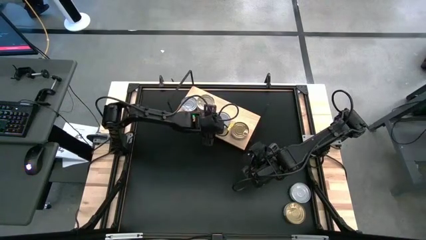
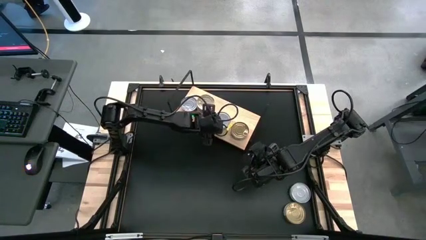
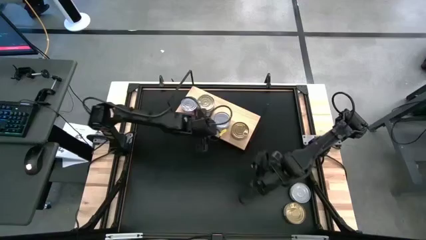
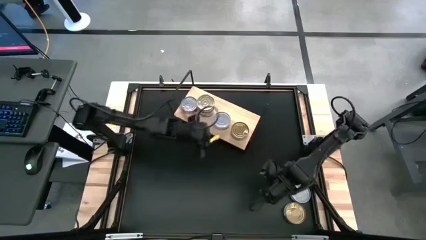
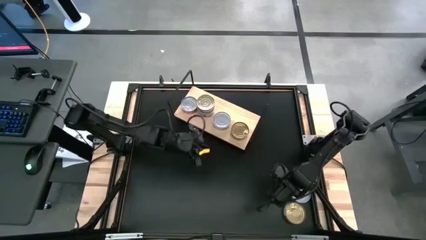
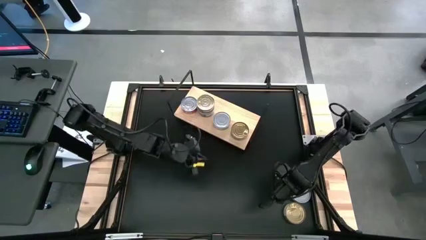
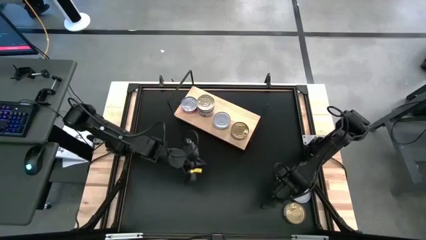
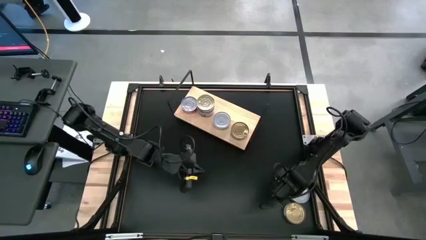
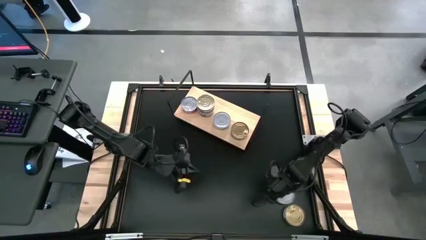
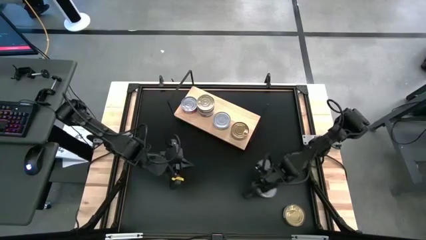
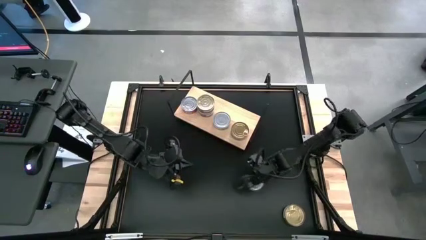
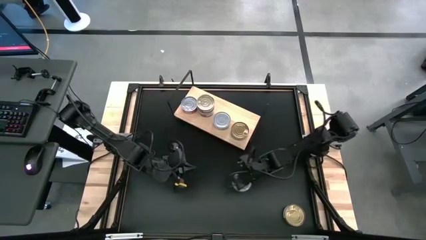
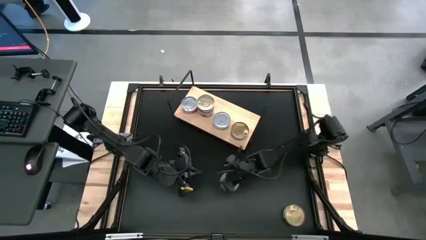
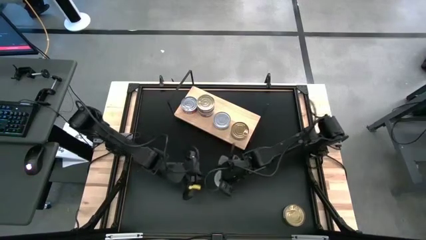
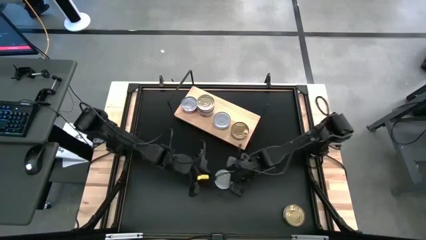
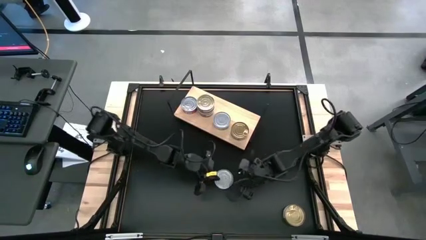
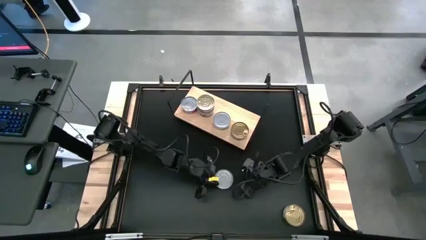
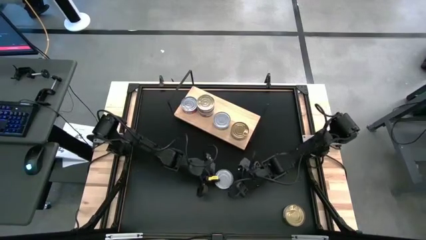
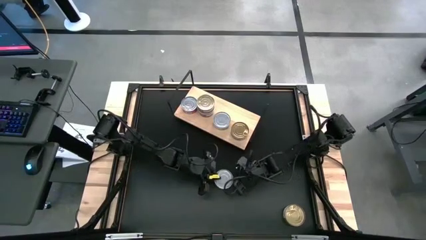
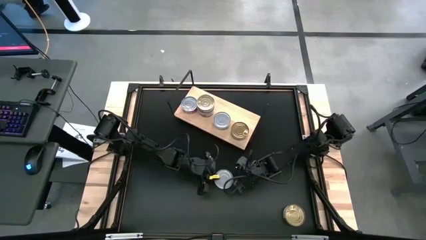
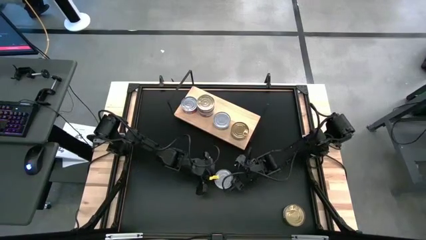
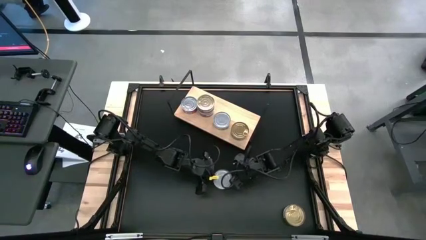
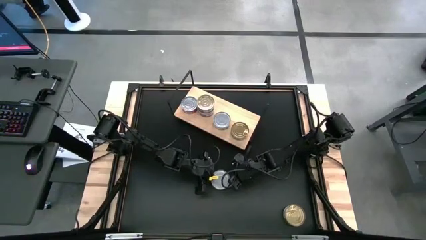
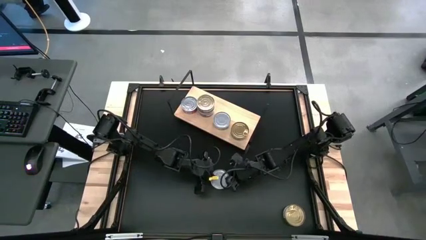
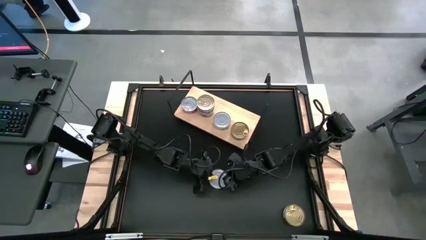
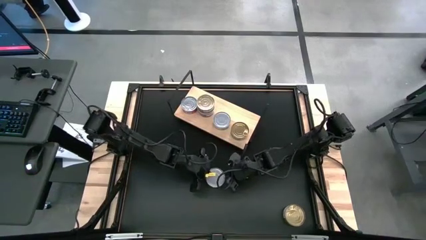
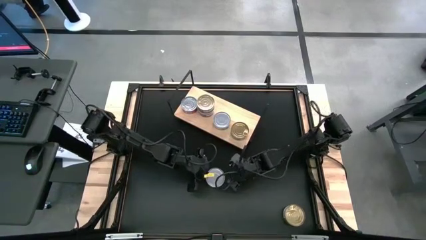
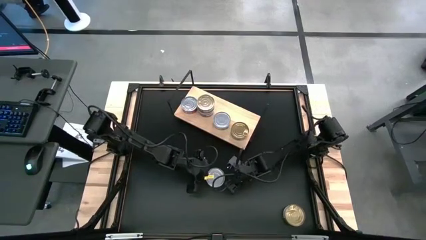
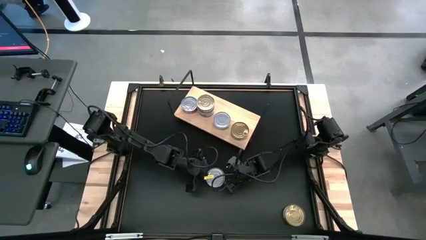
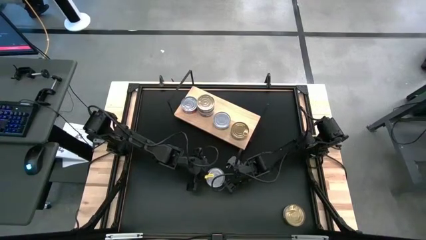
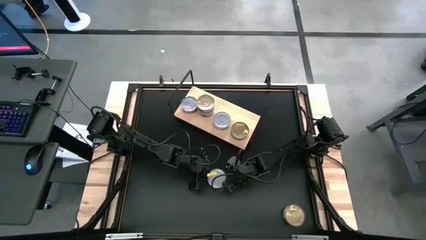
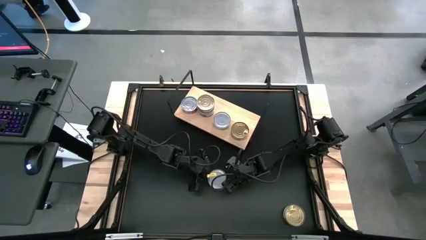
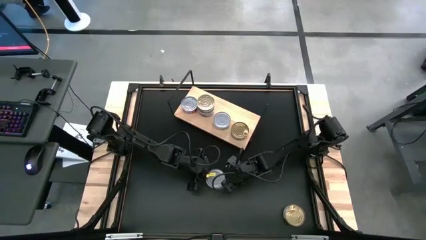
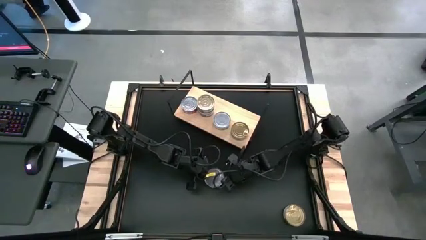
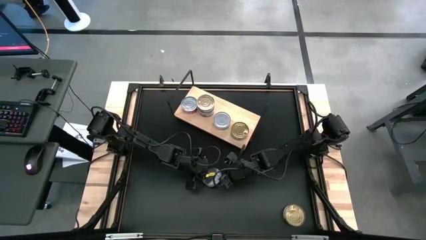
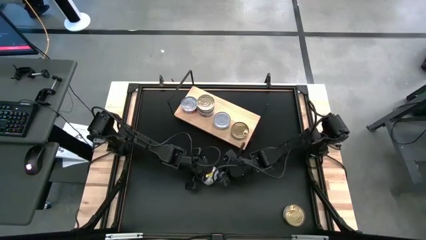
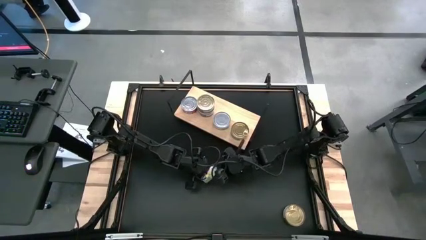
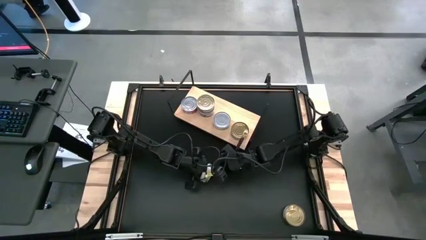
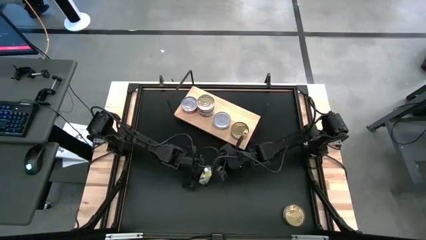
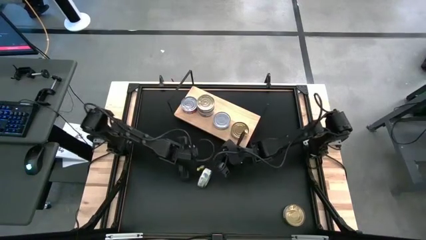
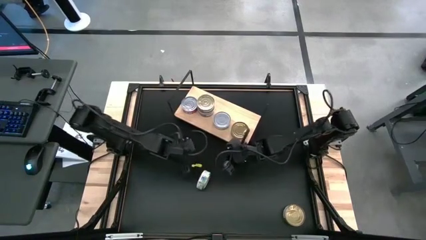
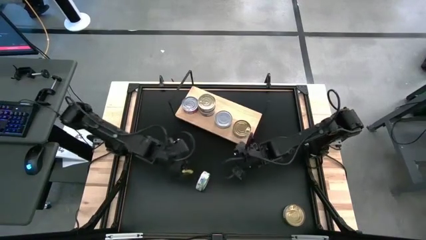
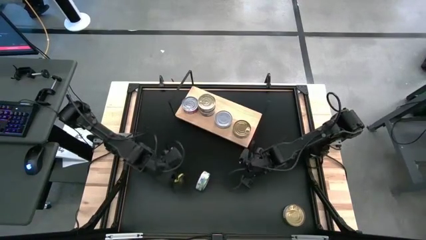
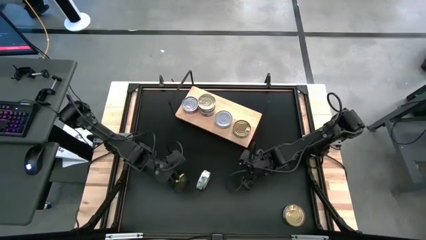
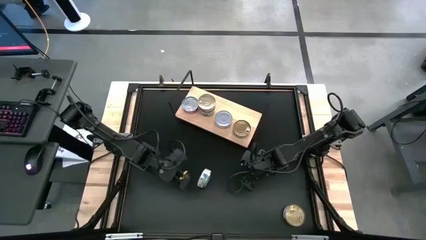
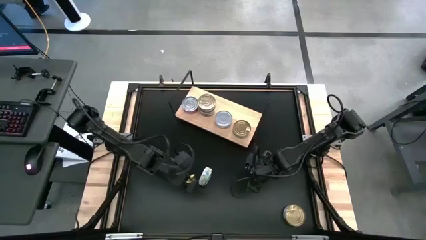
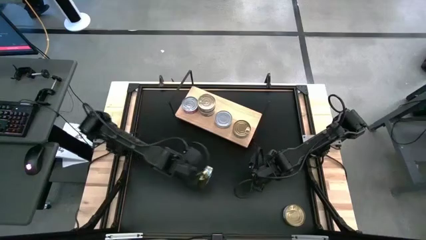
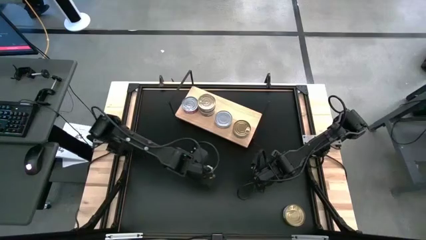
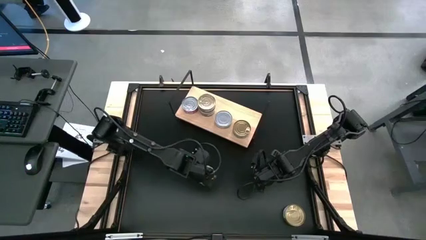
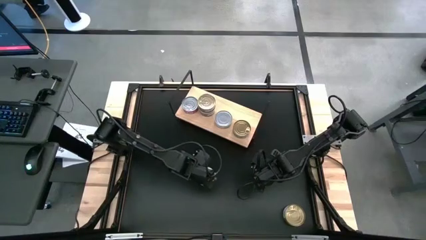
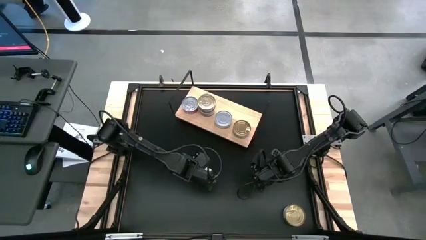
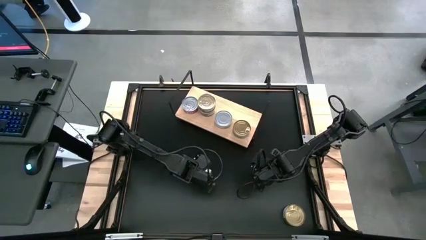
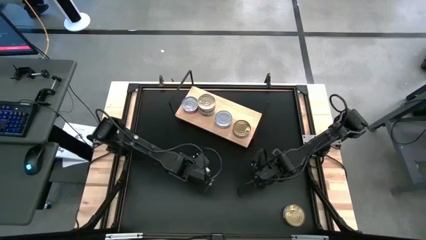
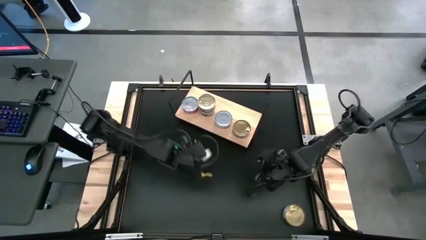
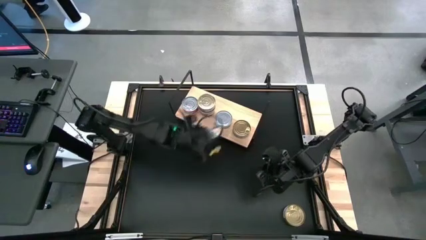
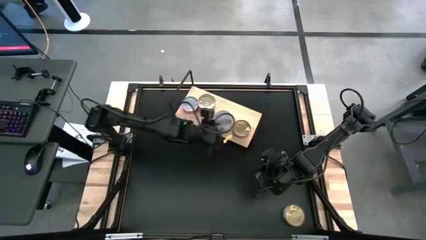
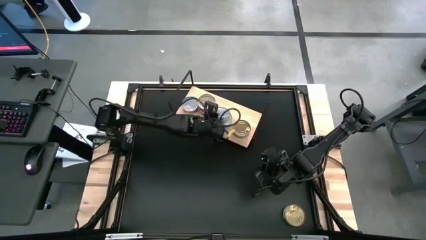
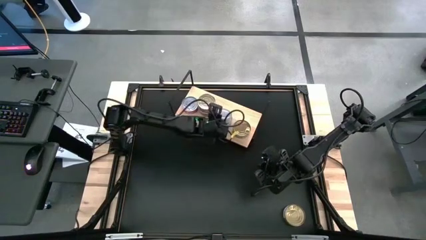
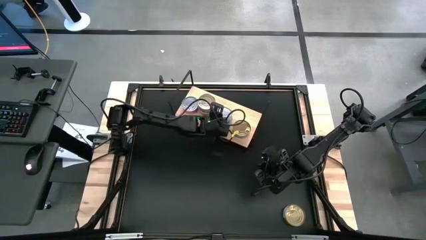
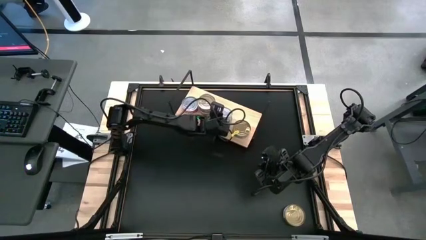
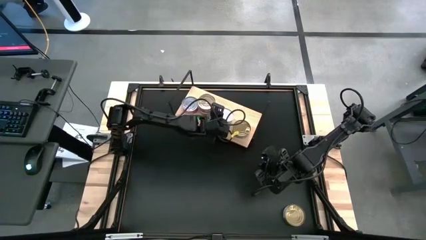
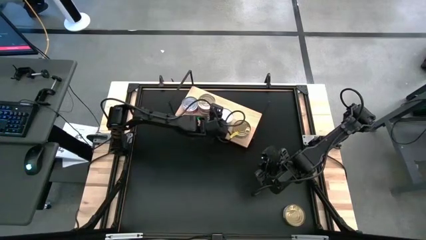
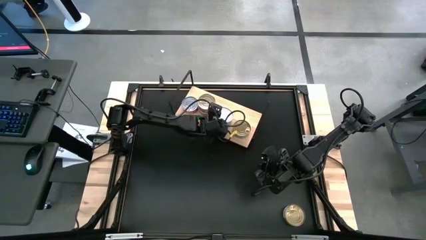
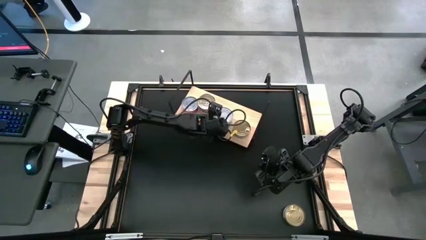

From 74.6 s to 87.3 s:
Task: Stack canned seafood by type on shelf
Stack the green tuna can on top of the green tuna on the shelf
